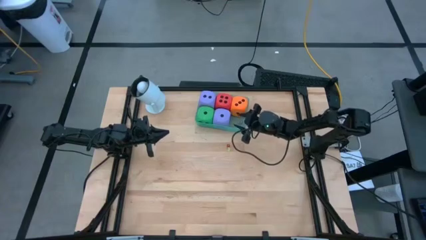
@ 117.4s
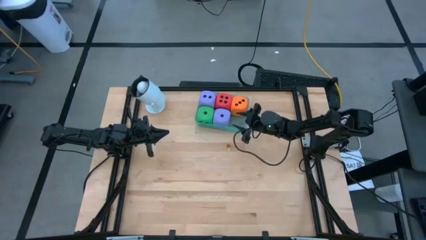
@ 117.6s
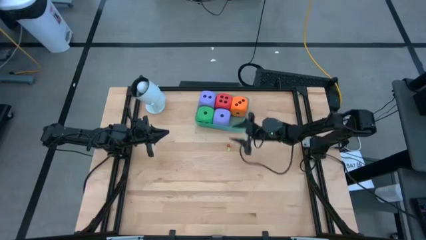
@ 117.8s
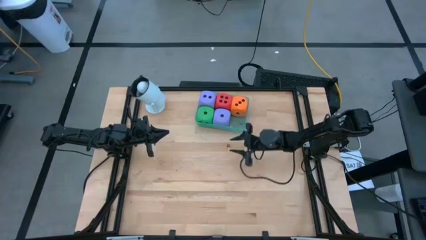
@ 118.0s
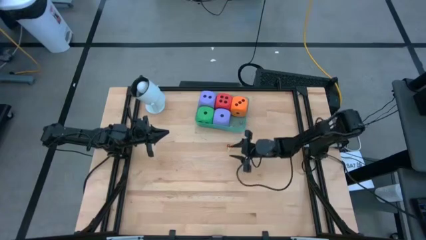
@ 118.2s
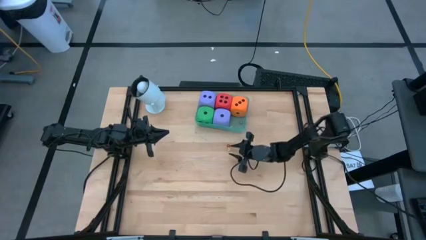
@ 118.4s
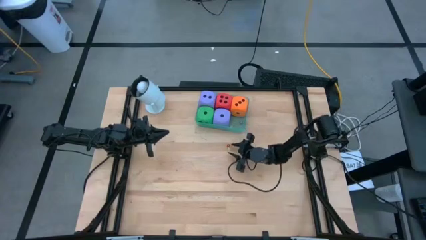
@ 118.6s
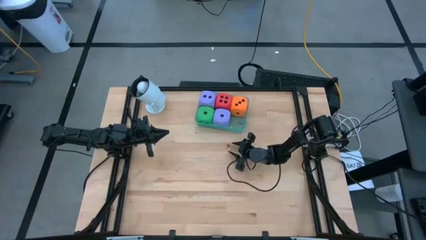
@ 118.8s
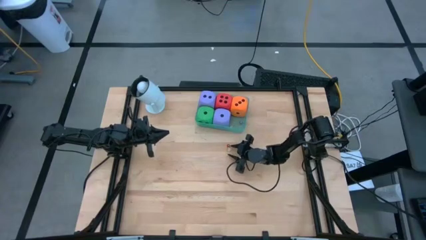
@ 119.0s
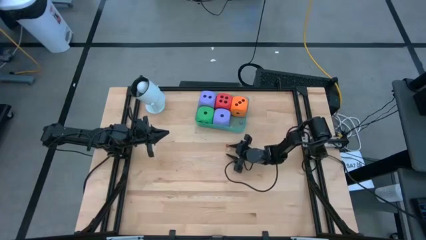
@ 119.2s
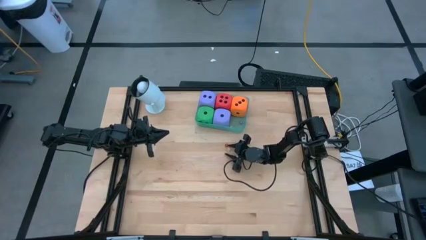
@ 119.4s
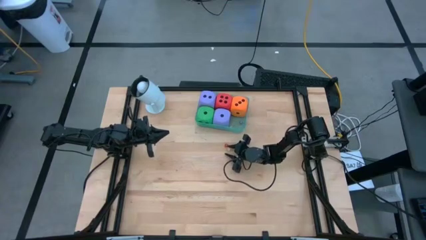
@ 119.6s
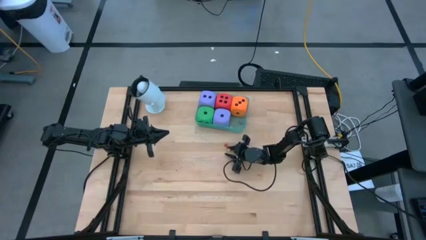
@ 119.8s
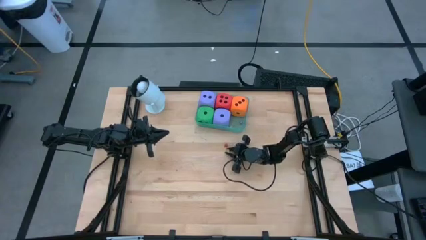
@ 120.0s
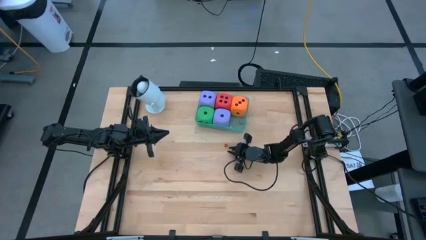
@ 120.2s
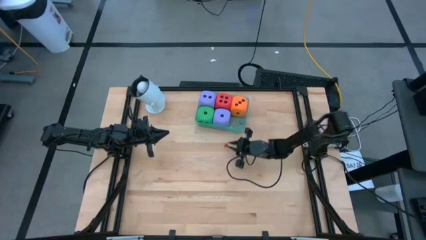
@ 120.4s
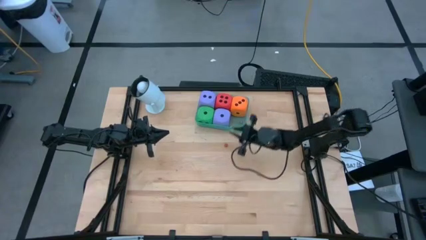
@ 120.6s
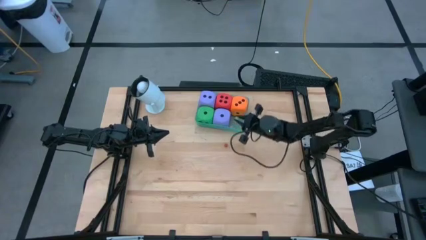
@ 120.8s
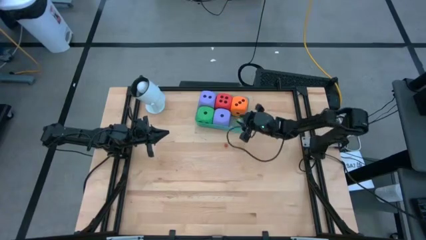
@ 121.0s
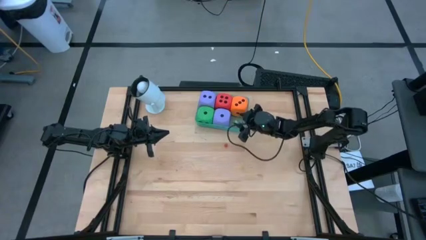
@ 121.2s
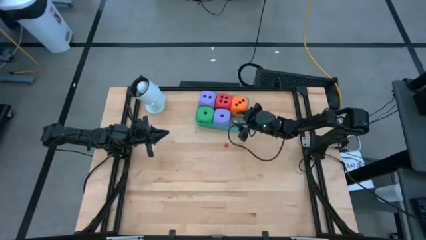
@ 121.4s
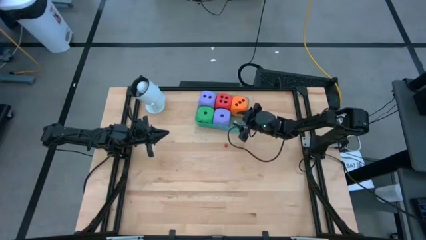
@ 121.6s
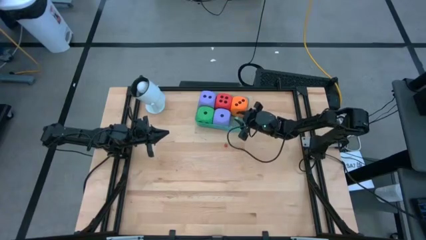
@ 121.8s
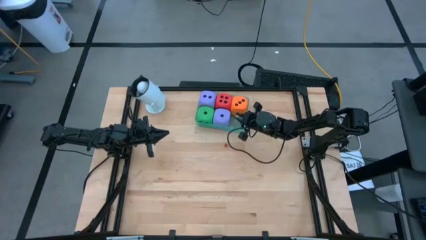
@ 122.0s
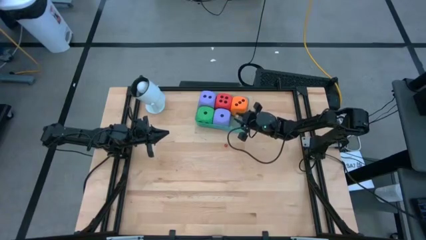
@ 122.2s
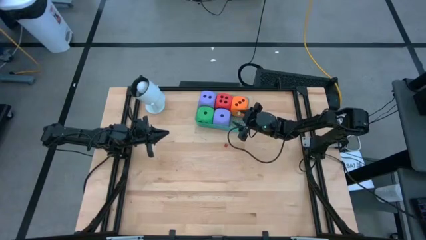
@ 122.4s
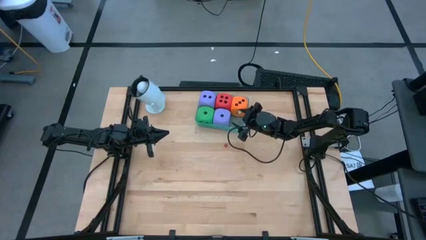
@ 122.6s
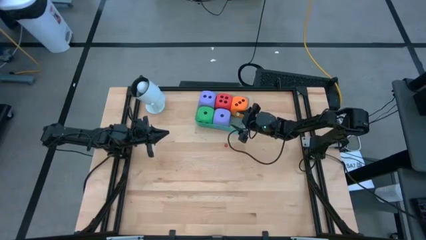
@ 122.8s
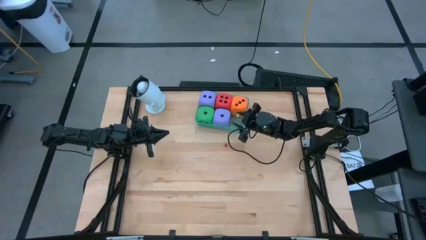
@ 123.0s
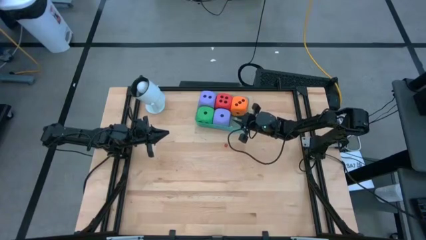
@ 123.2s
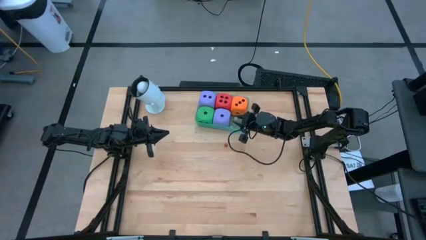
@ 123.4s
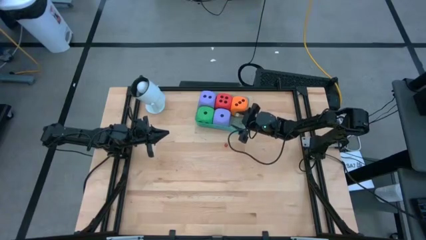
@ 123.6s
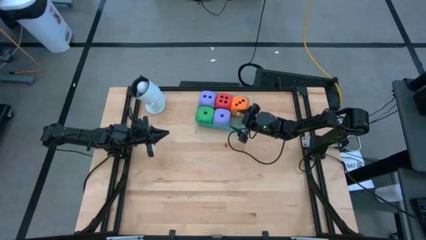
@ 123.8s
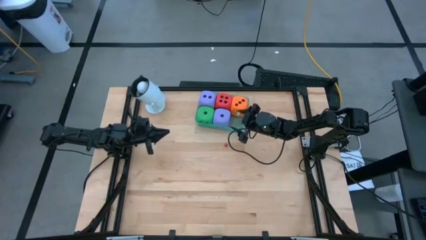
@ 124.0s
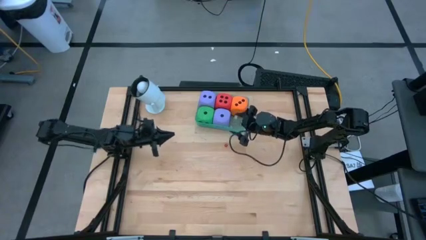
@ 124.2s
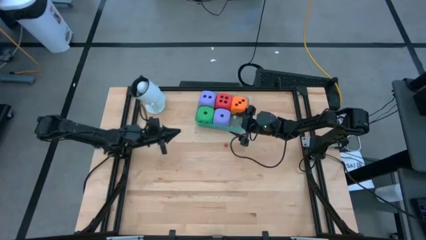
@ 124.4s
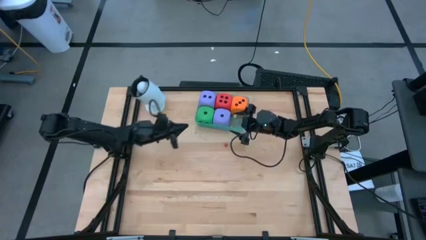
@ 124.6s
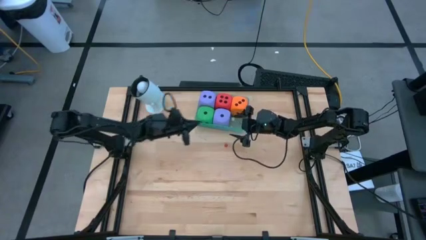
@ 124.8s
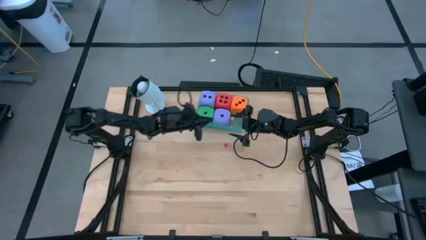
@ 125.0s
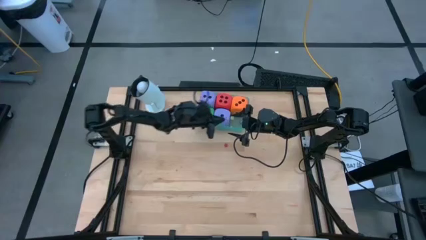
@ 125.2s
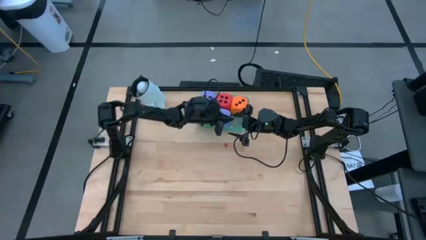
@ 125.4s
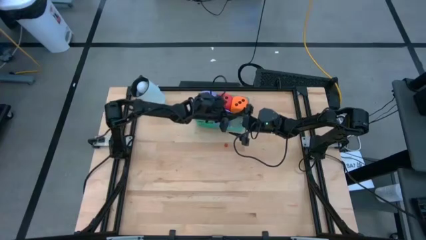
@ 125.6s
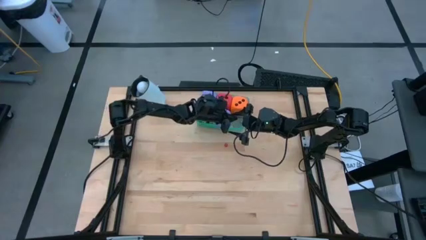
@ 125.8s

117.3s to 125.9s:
Task: Pick & Place Dice
Put the small green dice into the transparent blue bin

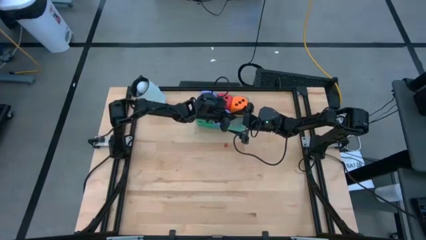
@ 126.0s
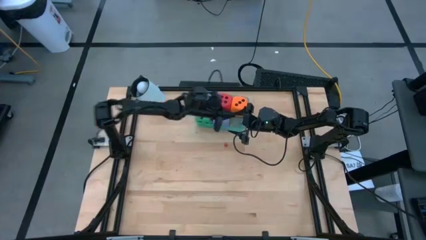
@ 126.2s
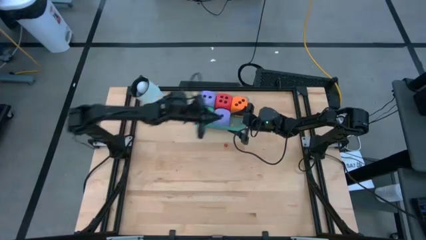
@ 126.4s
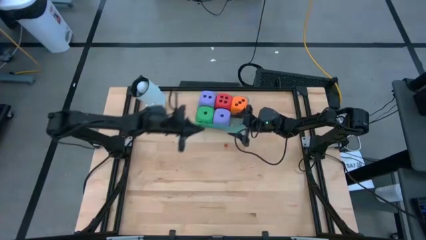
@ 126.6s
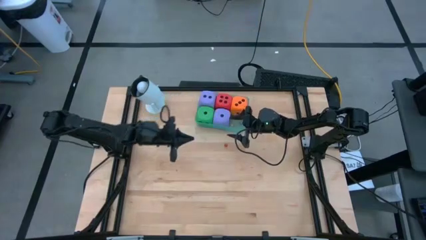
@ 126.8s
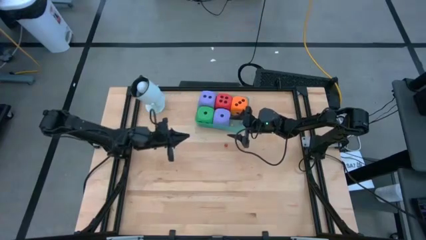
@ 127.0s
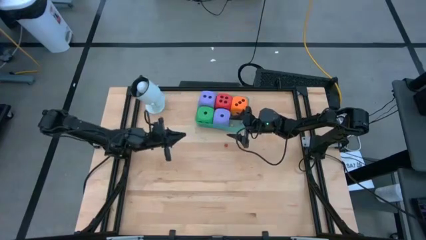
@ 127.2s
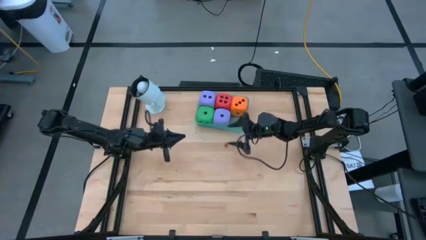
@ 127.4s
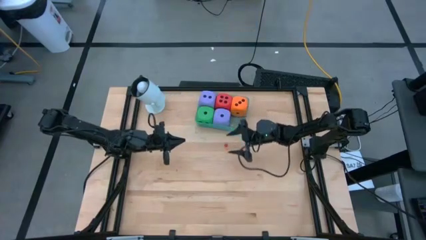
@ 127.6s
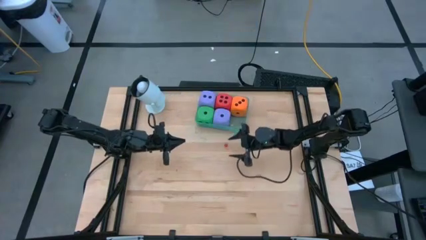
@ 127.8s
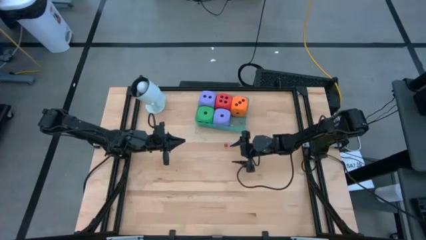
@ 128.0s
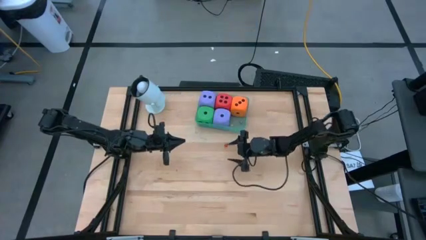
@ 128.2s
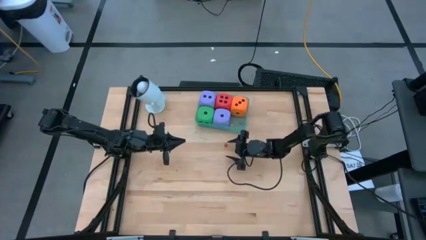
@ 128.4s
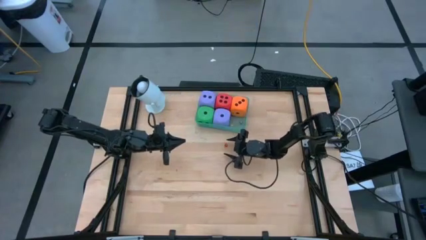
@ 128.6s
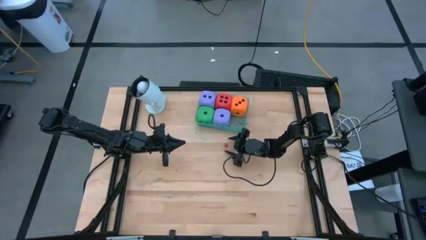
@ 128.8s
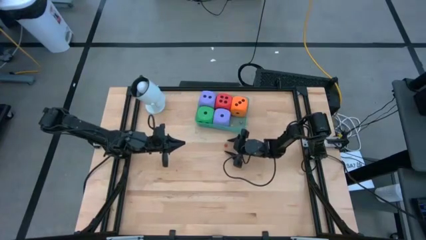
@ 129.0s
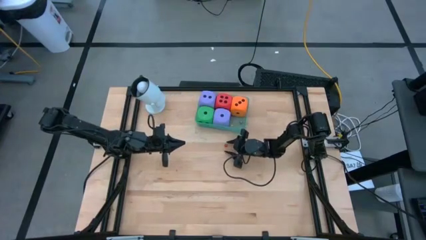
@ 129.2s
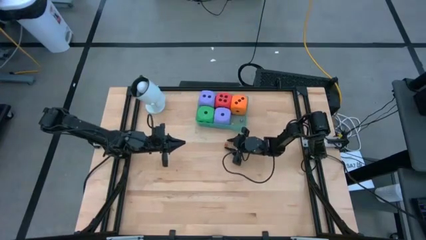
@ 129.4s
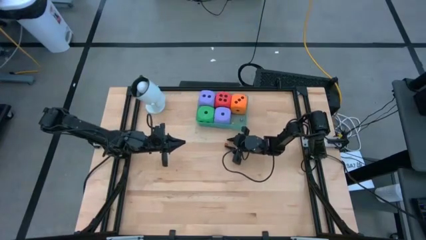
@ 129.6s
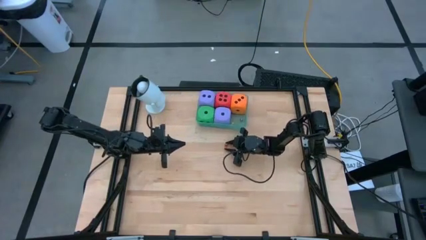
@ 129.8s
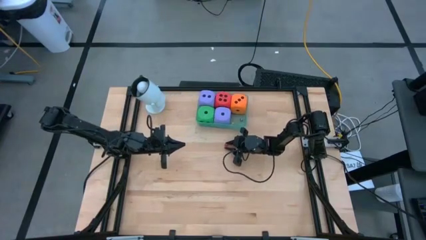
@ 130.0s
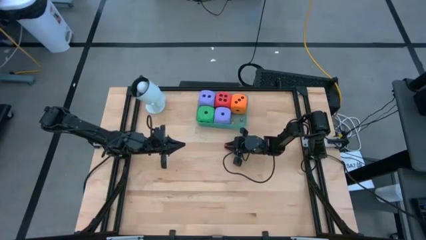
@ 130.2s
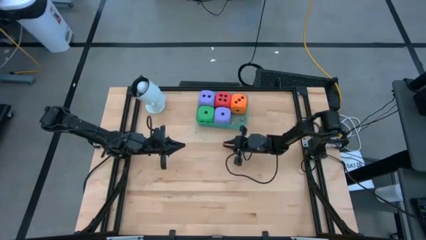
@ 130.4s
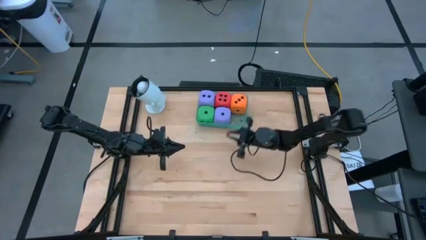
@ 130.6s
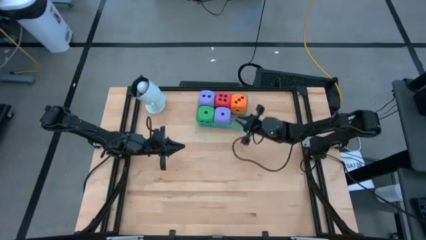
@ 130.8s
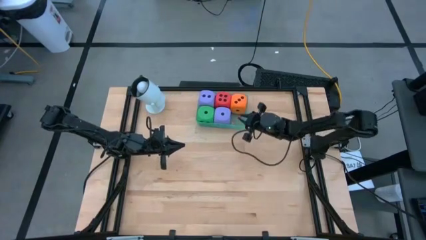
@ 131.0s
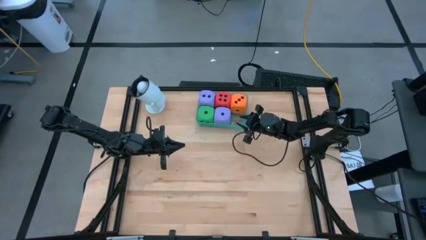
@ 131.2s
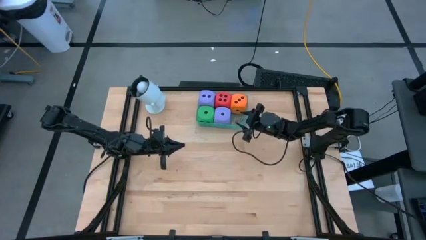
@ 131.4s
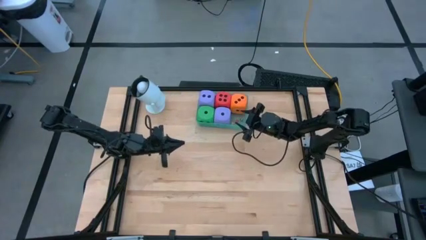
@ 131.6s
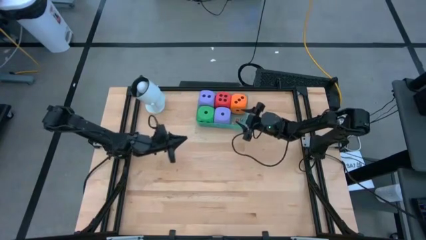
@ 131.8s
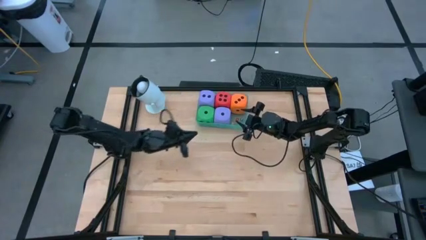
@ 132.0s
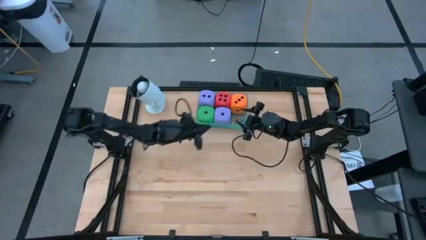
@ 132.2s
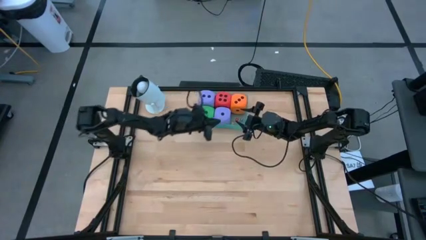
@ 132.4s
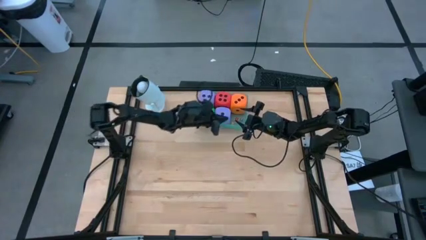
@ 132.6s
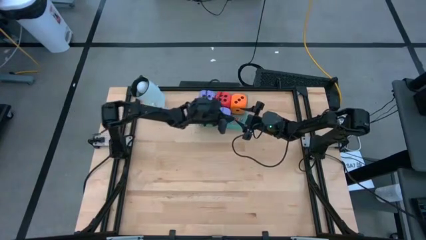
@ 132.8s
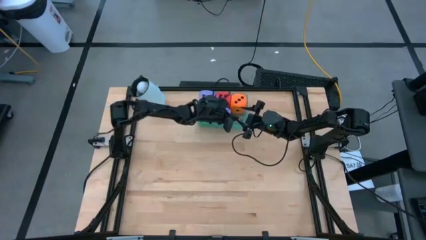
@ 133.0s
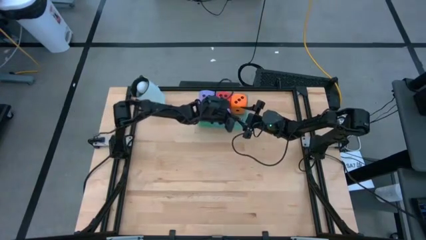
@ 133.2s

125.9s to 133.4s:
Put the small red dice into the transparent blue bin
